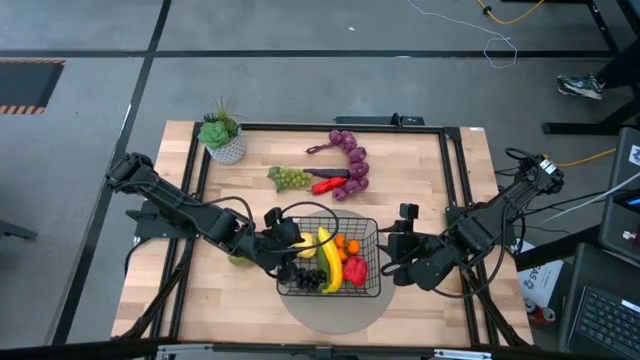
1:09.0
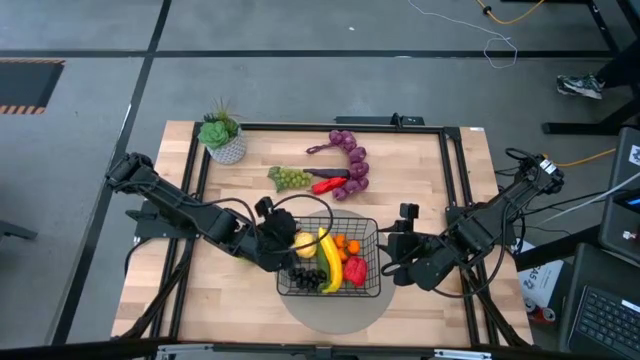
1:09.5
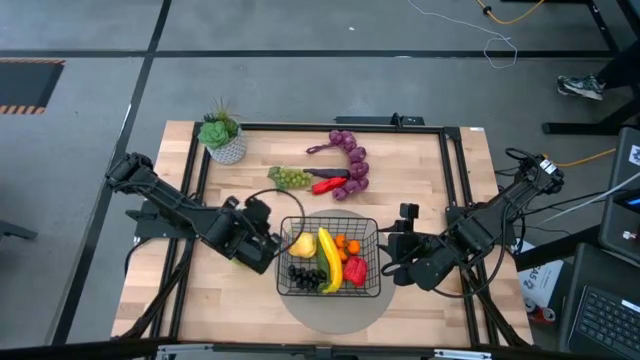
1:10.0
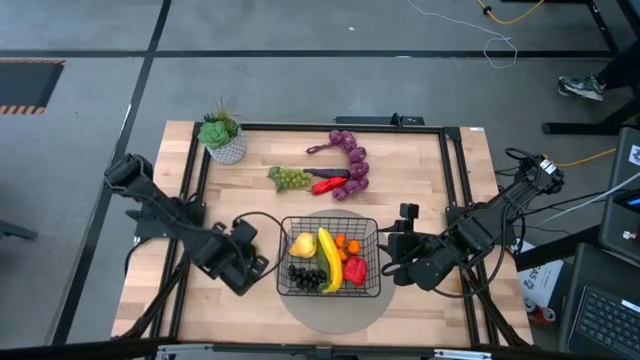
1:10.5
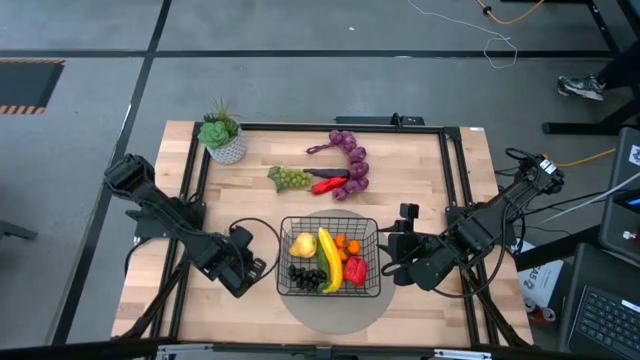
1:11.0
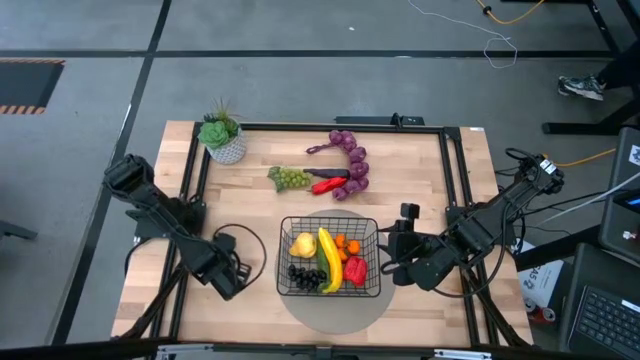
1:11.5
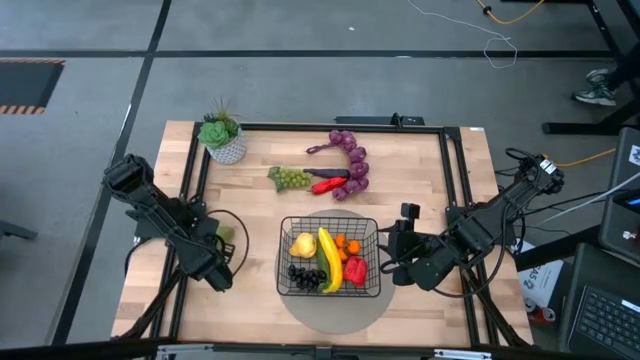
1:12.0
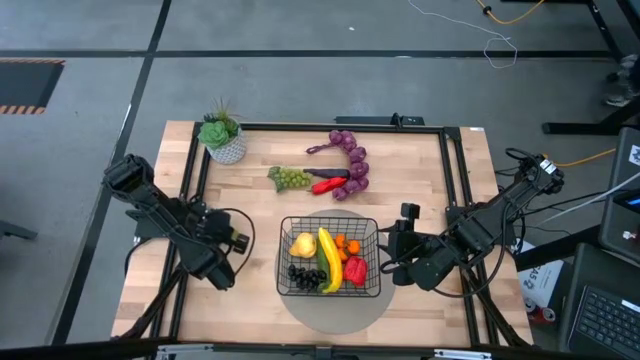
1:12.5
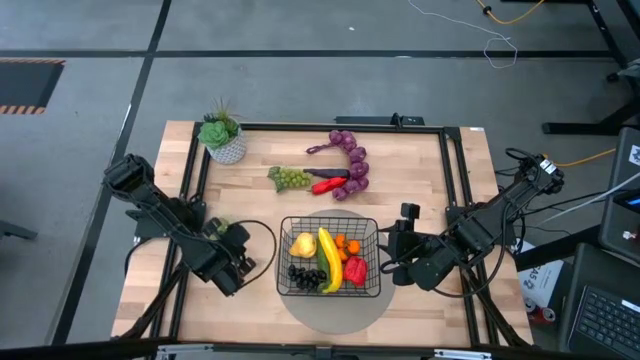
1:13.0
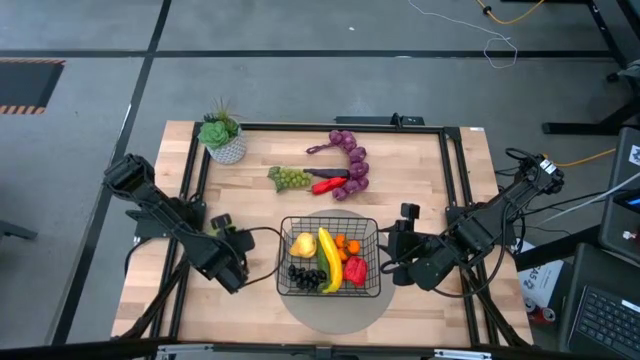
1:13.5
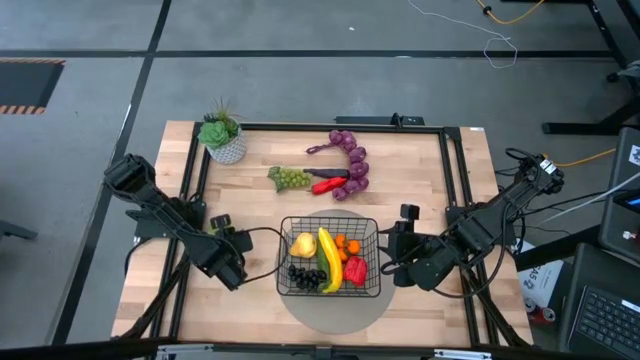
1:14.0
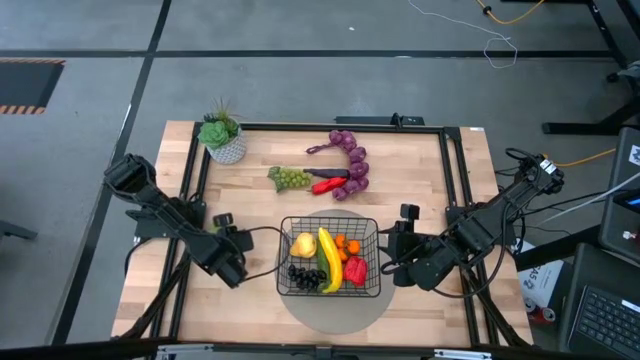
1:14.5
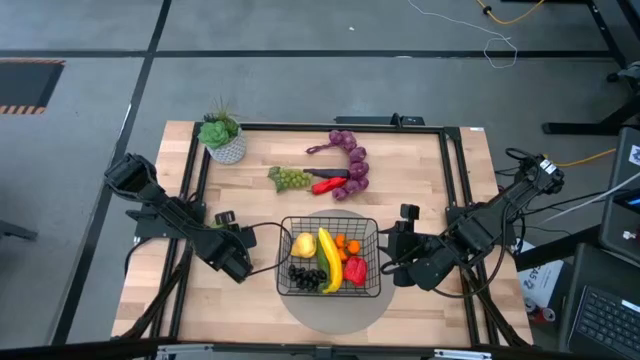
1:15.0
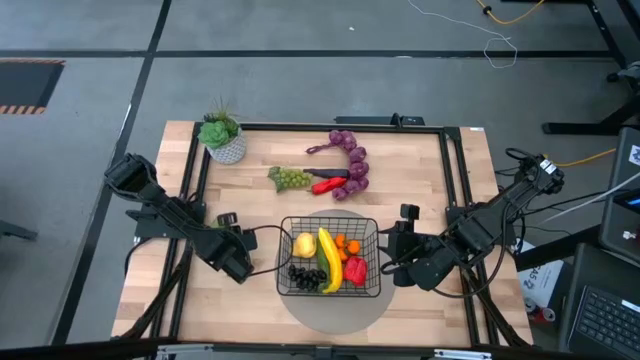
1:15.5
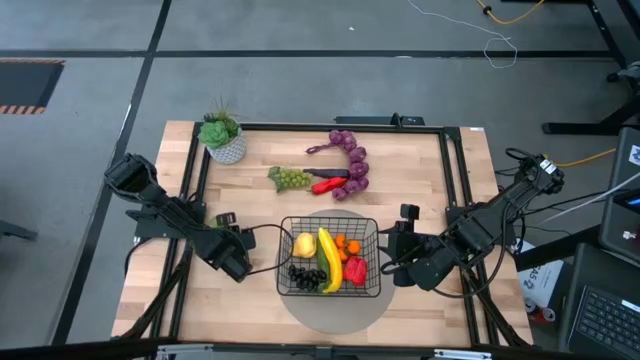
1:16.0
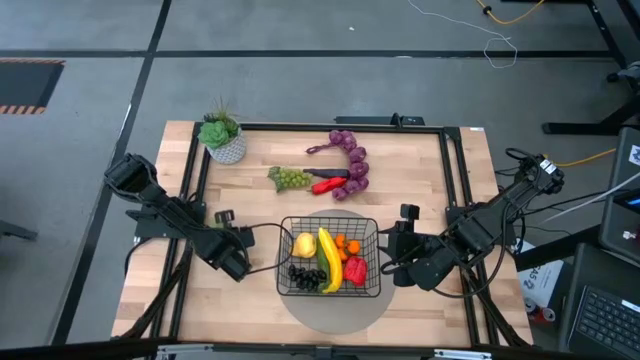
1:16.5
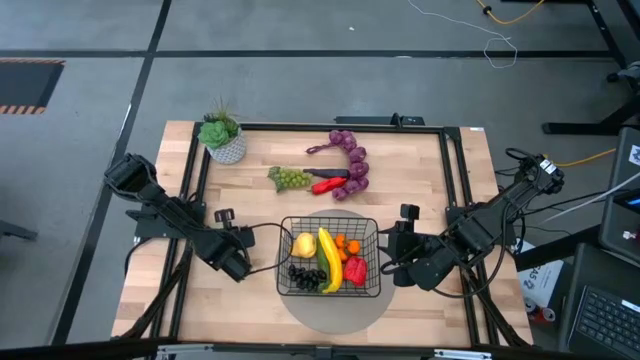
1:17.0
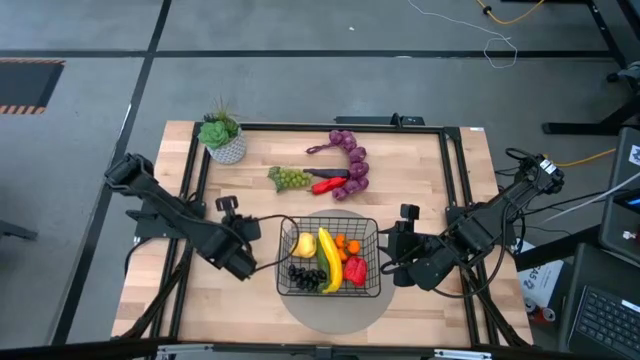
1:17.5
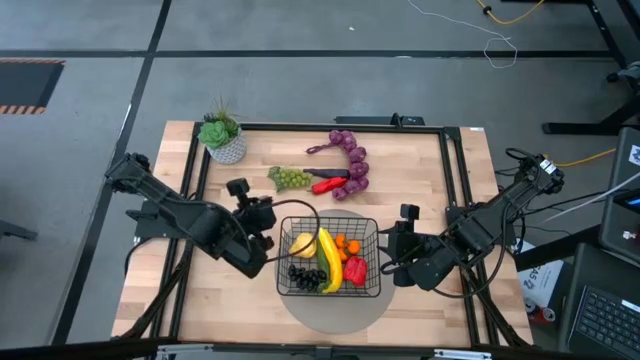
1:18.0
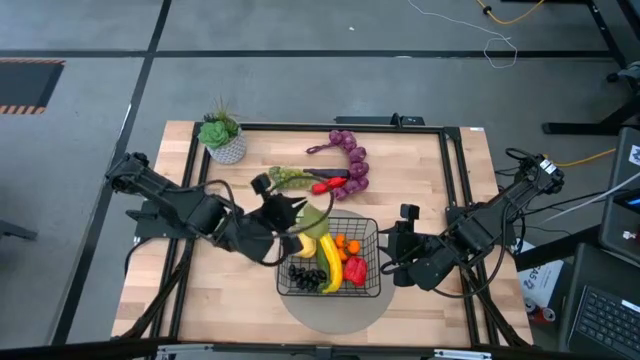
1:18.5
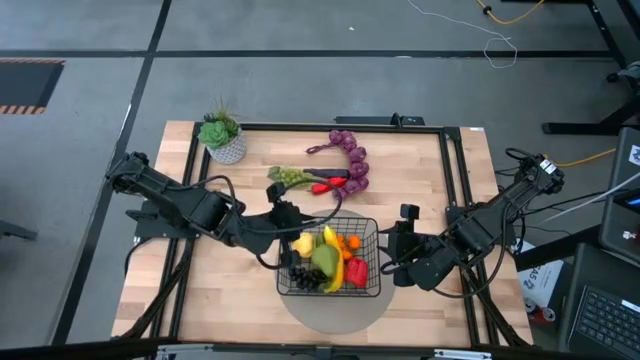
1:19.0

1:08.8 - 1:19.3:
Task: Build produce basket
Put the green pear into the wire basket

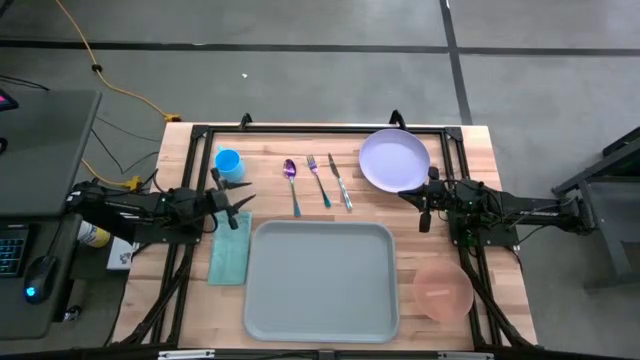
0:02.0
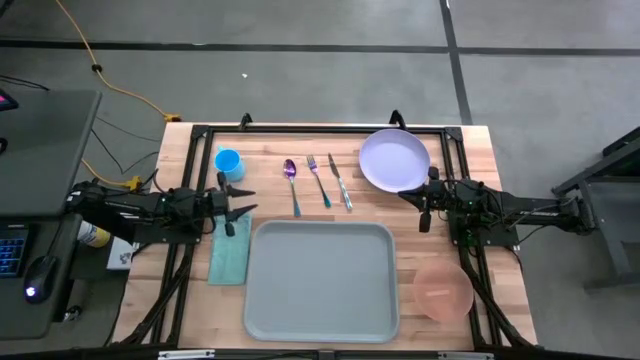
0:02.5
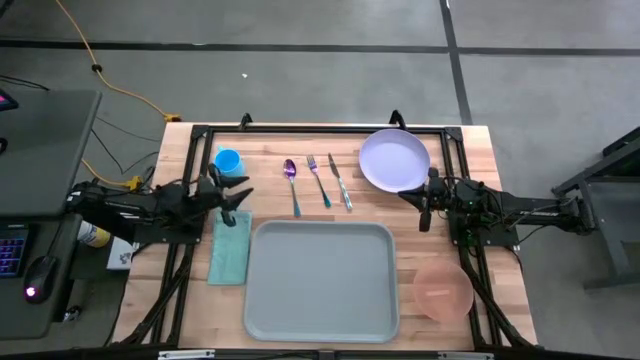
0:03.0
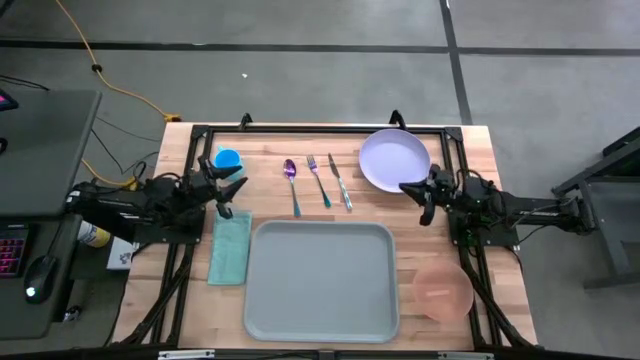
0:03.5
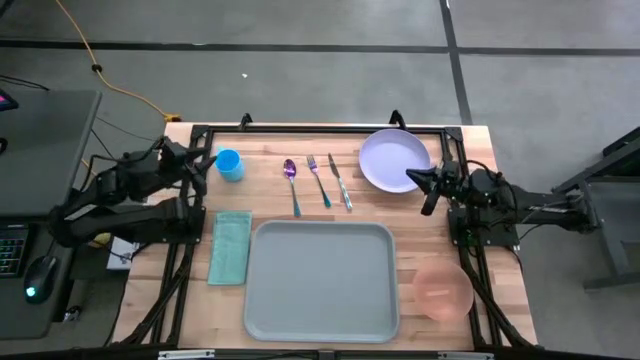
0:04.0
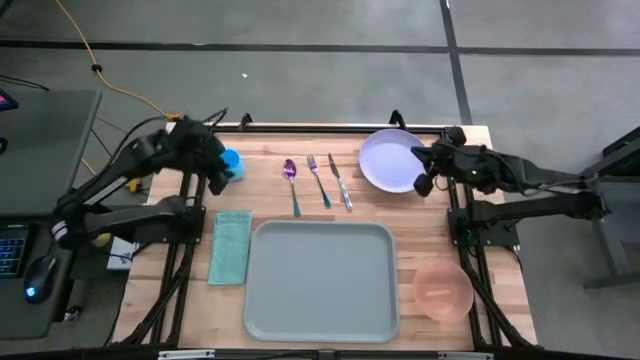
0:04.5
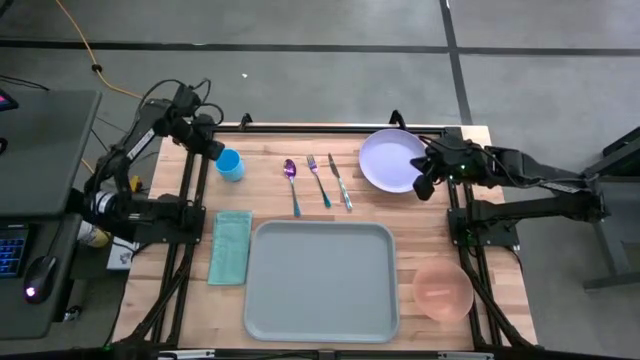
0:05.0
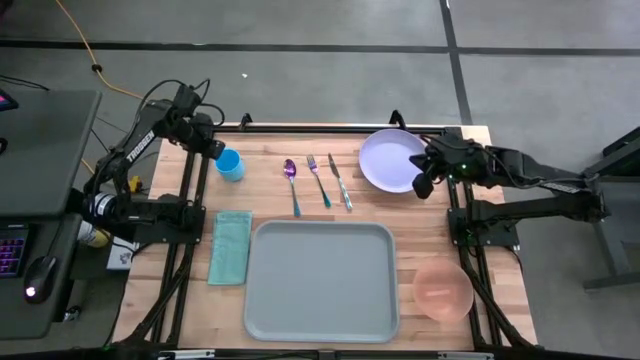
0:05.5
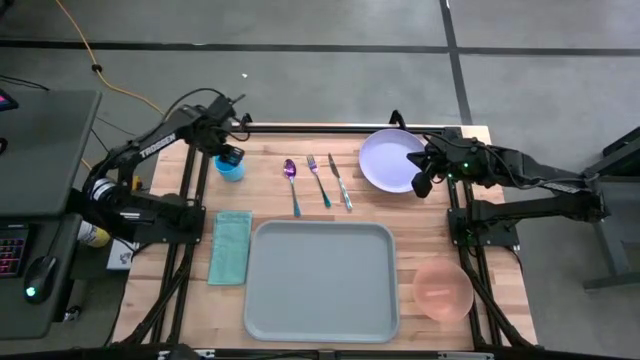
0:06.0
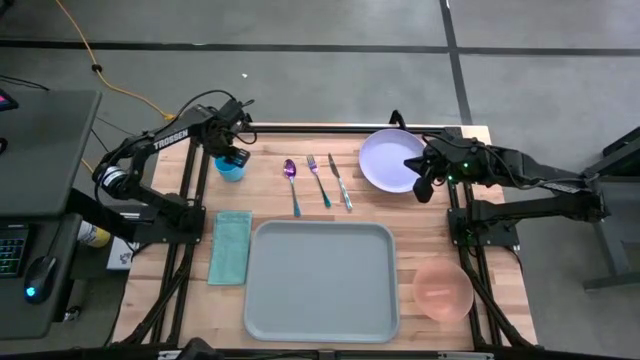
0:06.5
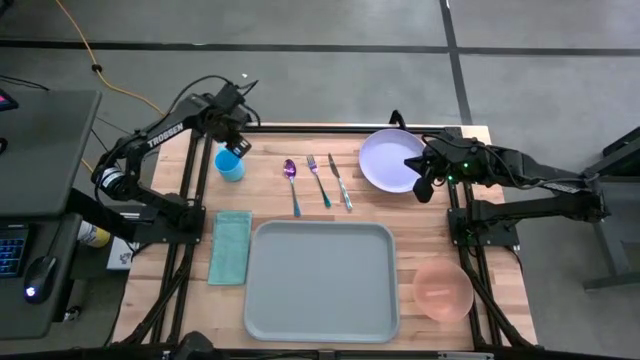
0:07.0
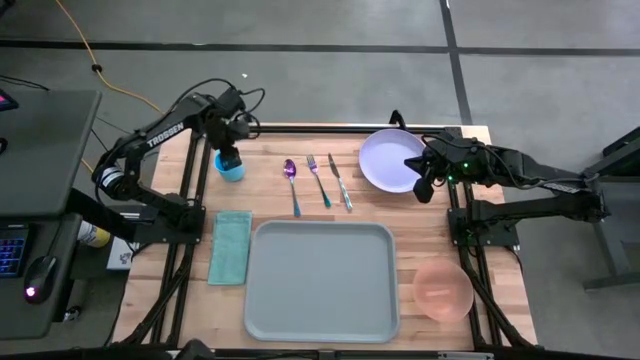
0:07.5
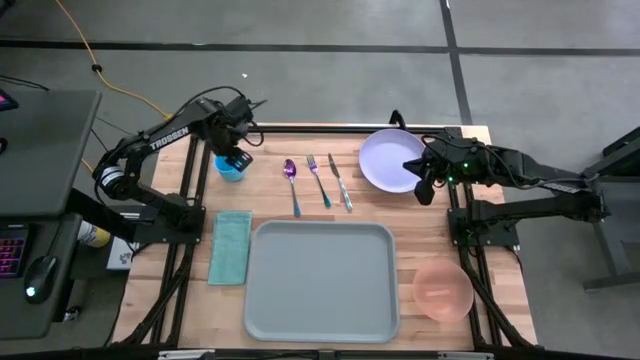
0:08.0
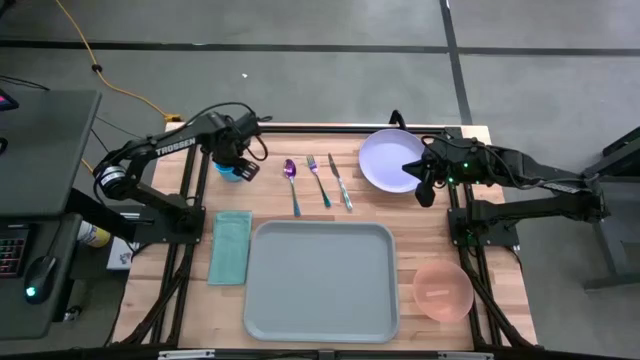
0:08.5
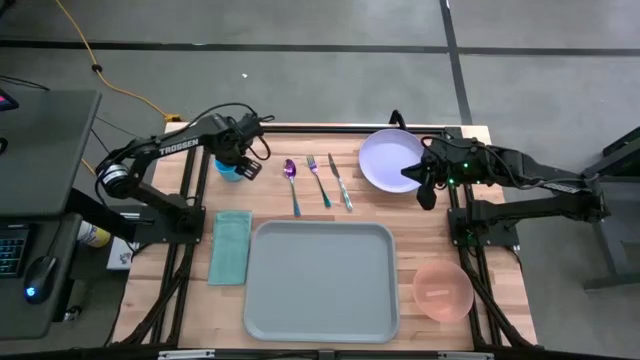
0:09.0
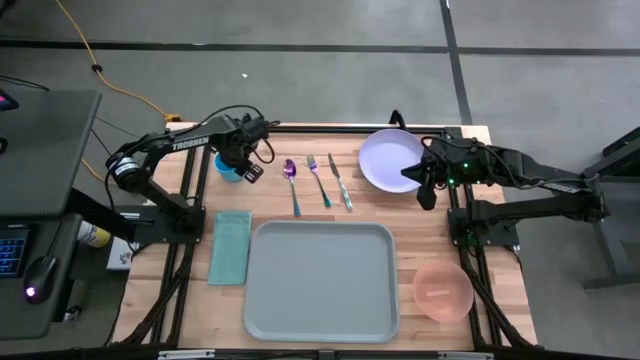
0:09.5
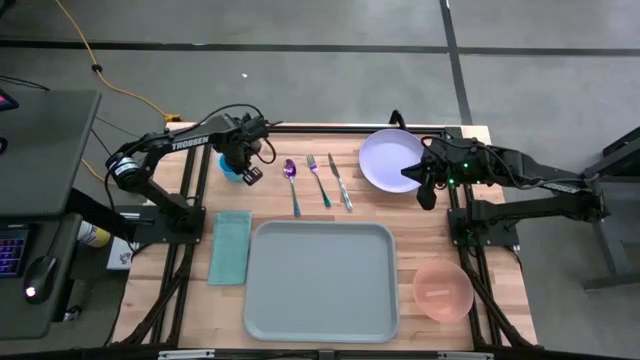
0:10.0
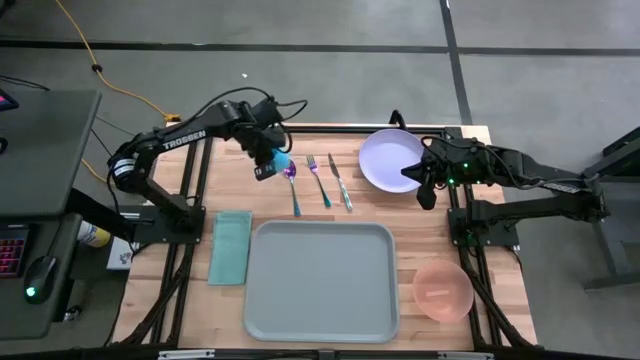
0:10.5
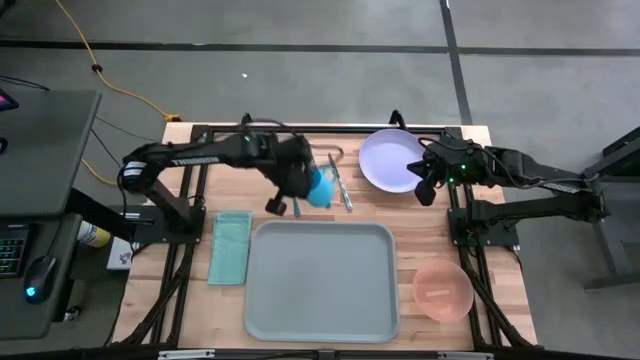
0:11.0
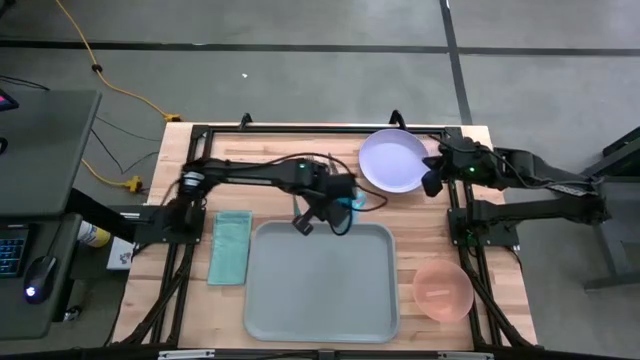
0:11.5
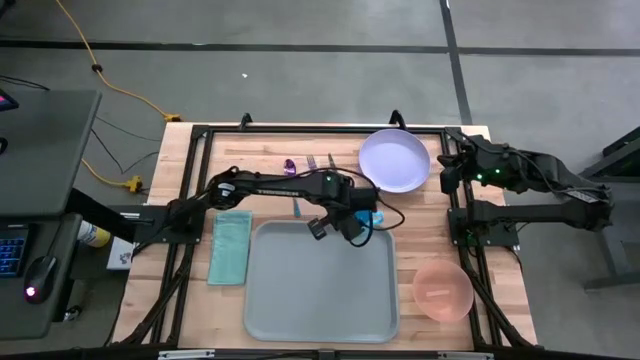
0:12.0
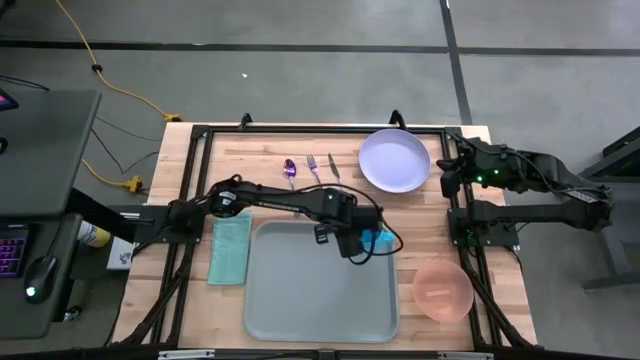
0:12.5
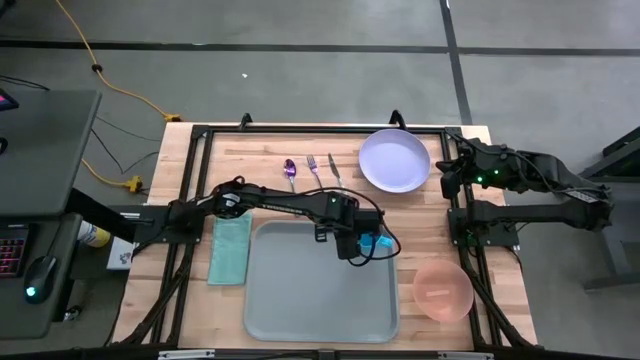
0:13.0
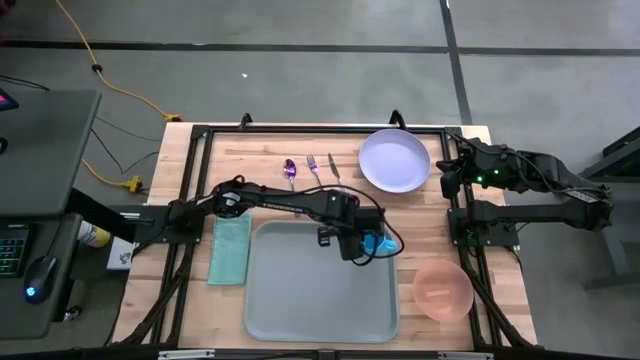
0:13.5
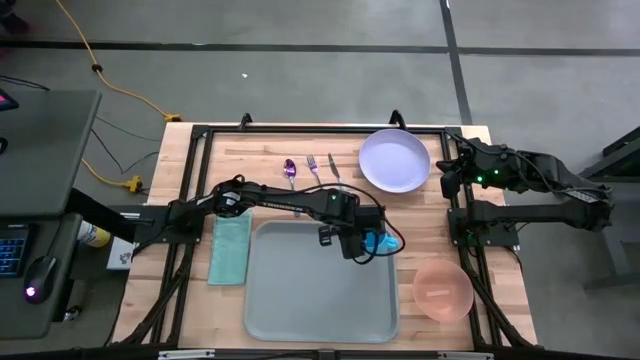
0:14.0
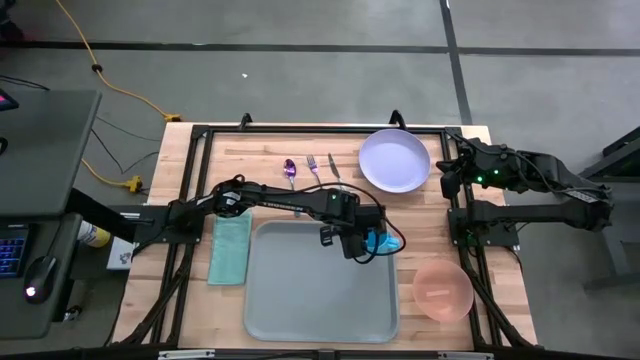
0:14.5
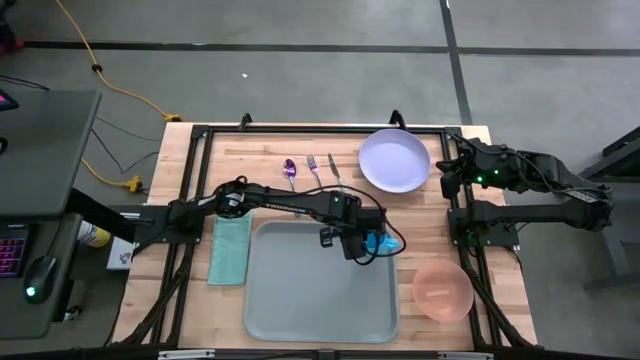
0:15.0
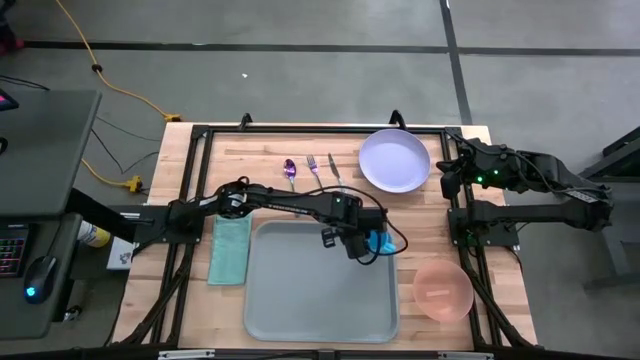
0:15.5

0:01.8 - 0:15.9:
Task: Set up tray
Put the blue cup on the top right of the gray tray
